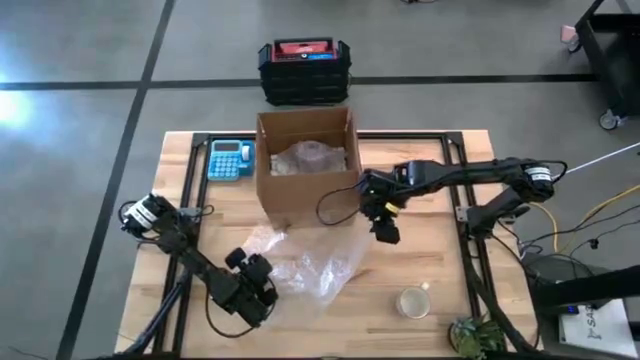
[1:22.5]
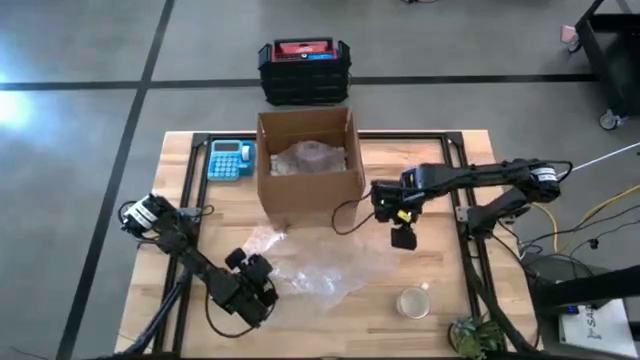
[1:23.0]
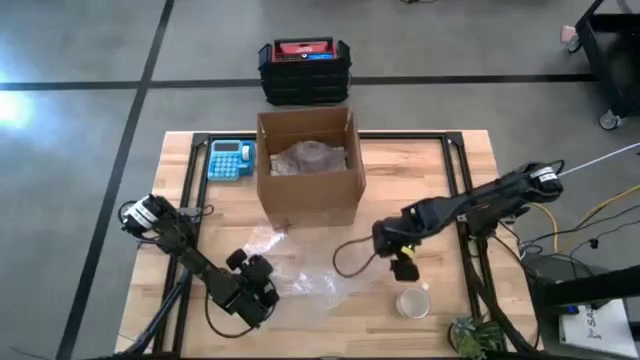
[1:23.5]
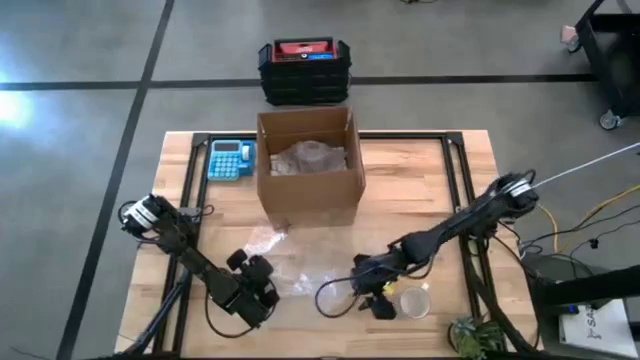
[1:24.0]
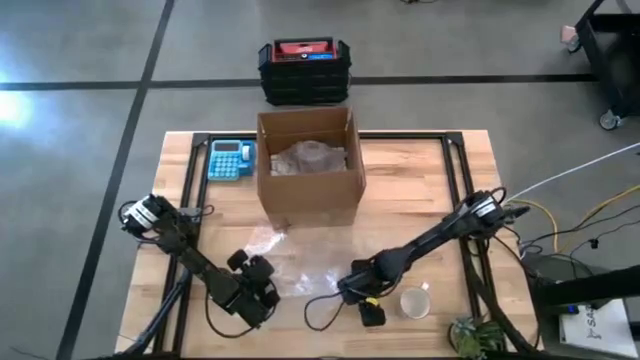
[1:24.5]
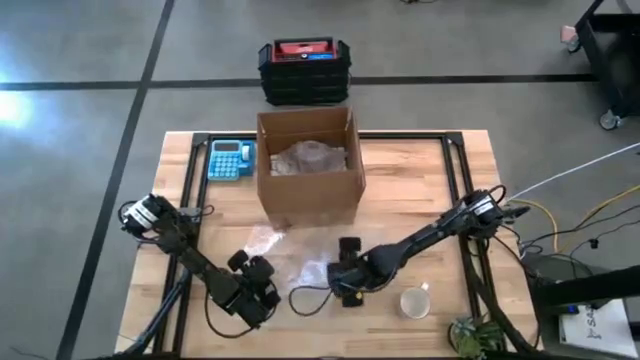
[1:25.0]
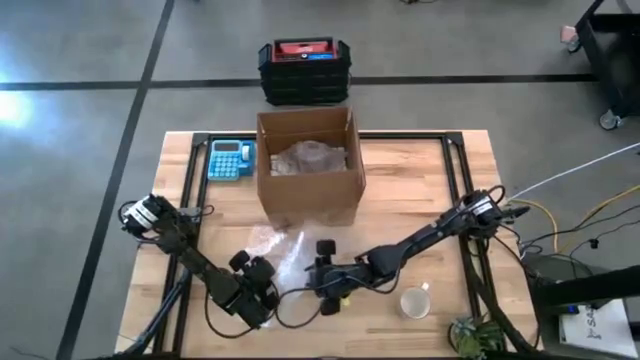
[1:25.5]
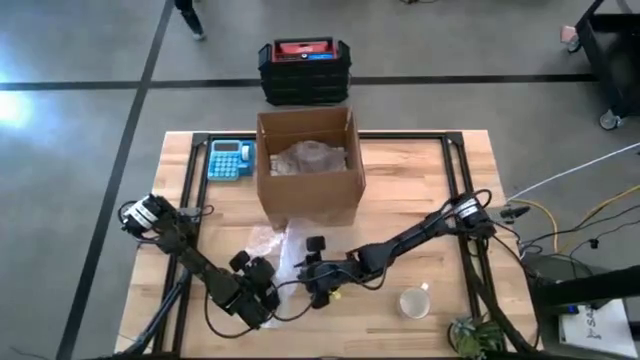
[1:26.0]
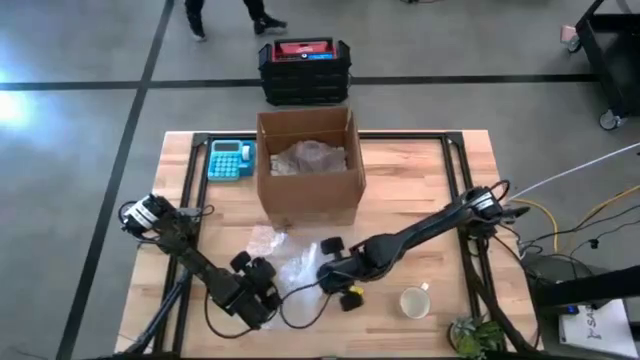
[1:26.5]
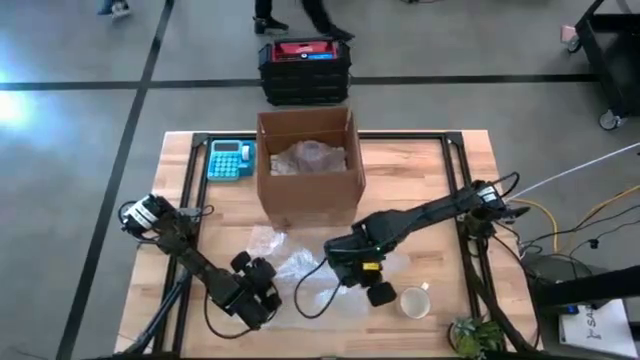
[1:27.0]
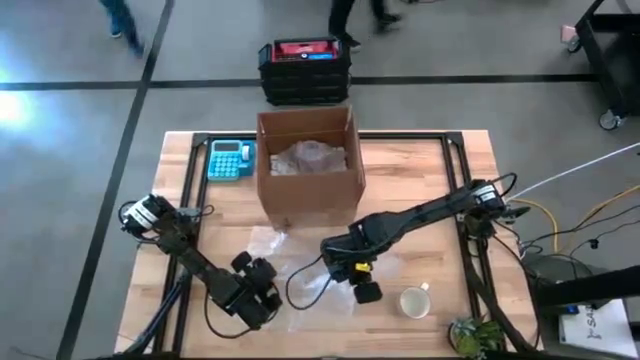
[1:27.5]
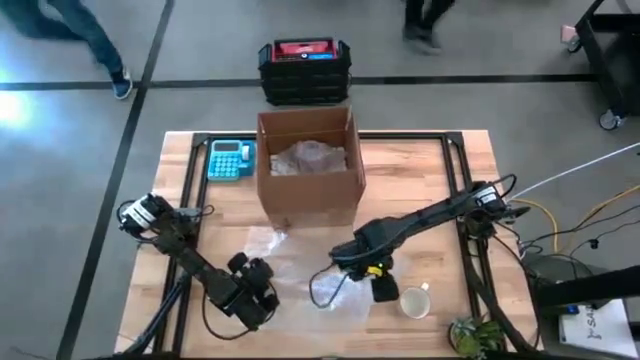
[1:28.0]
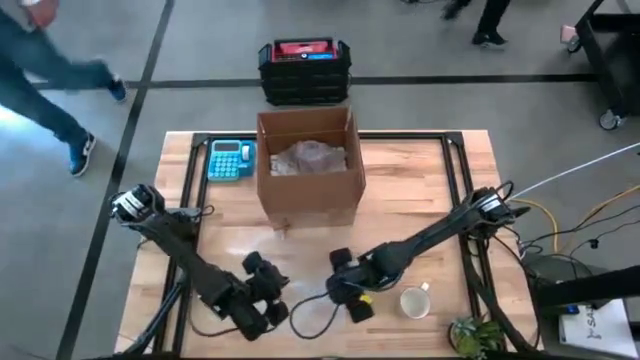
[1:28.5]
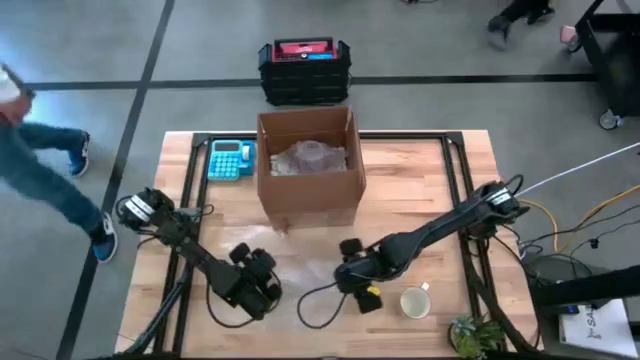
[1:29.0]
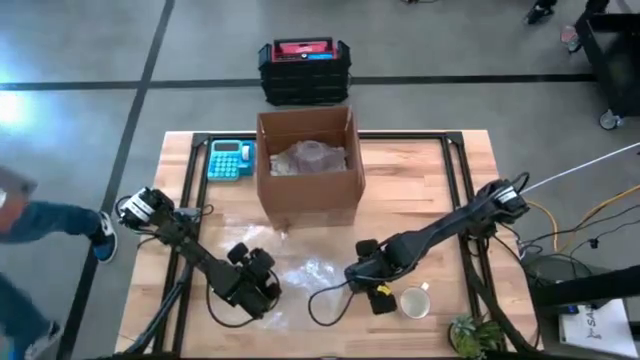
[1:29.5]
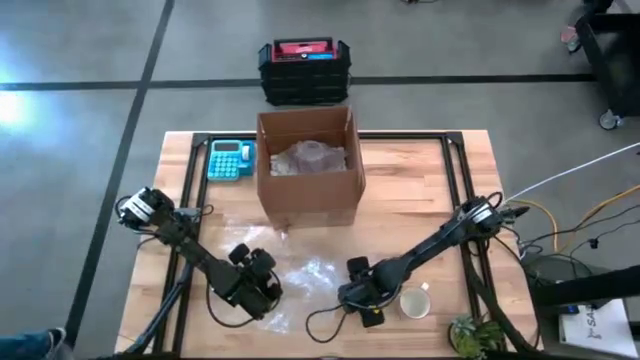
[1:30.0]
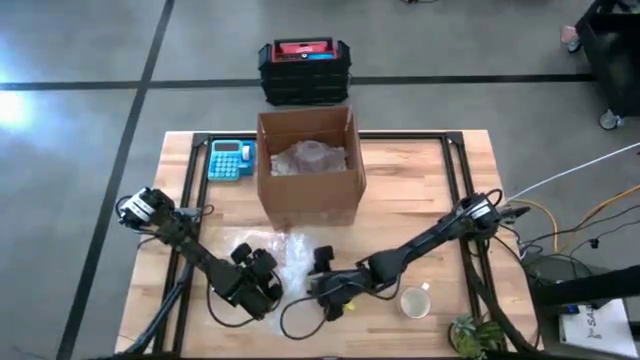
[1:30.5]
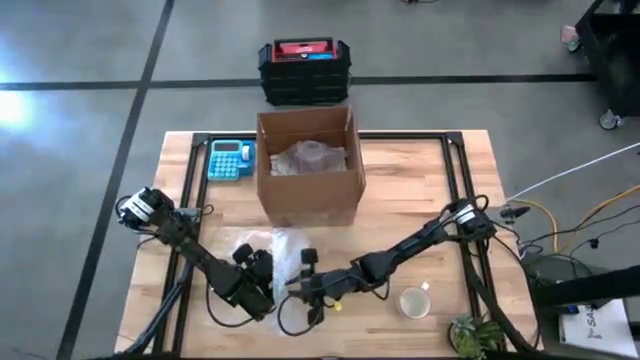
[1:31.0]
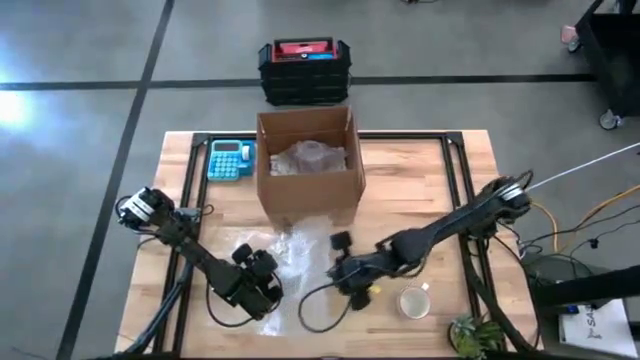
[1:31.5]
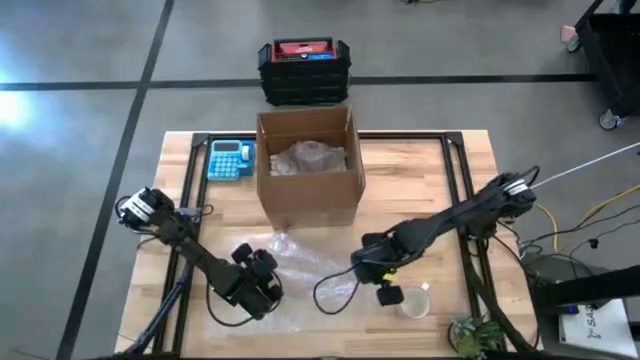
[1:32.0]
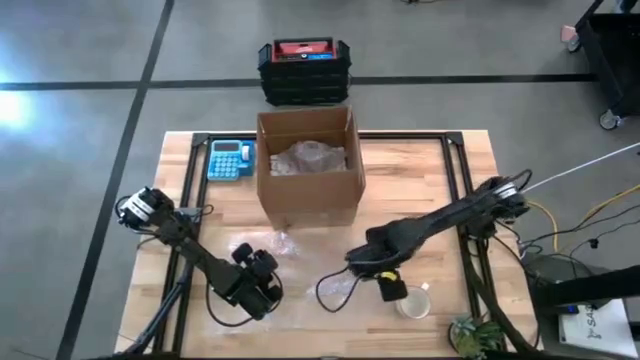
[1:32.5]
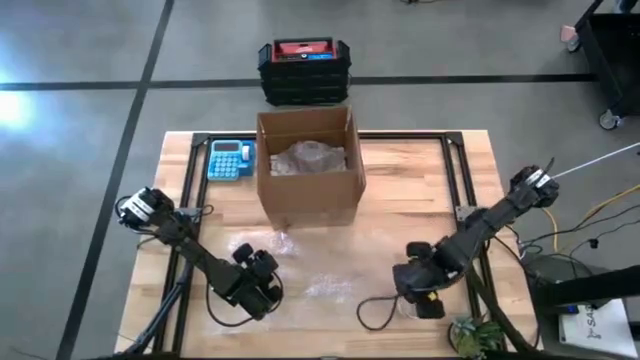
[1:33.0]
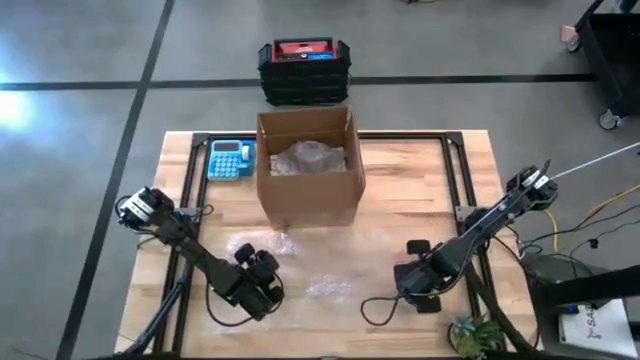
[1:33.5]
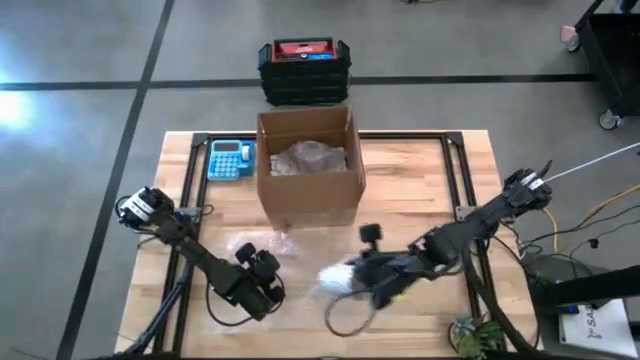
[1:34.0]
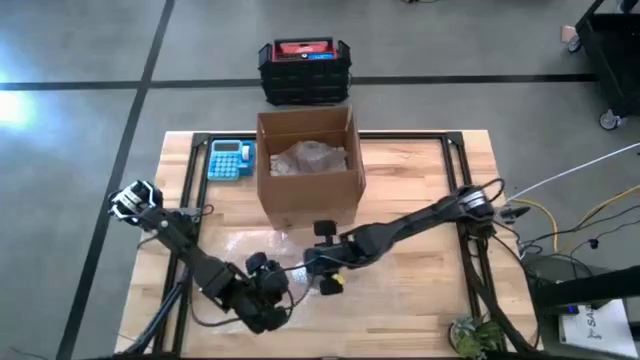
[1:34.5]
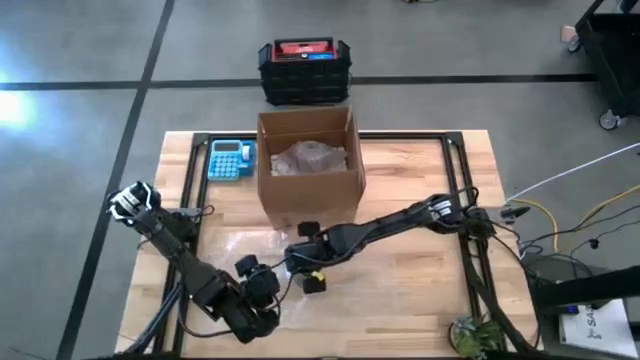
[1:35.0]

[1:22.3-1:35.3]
Task: wrap mug
Prepare the transparent bubble wrap to wrap the gray mug

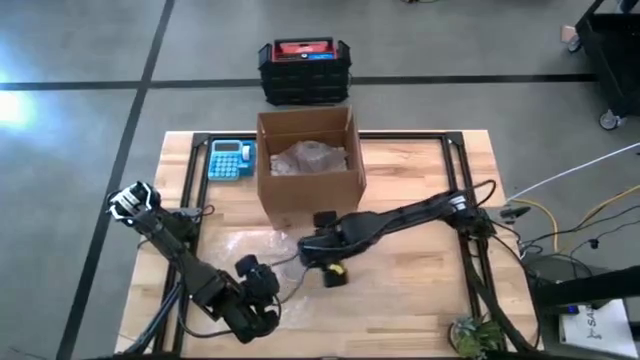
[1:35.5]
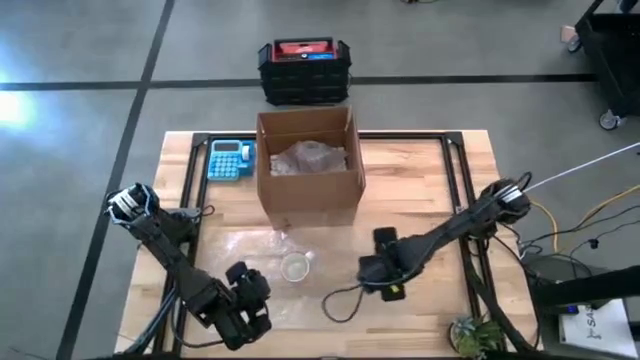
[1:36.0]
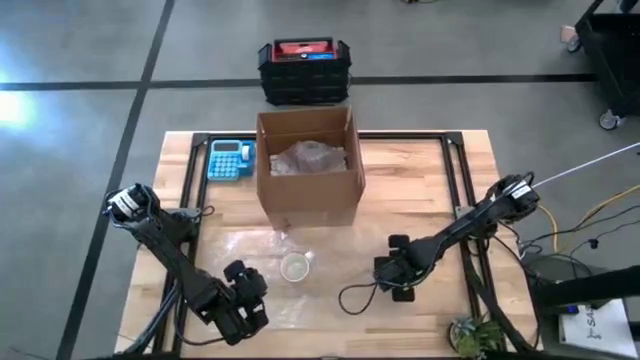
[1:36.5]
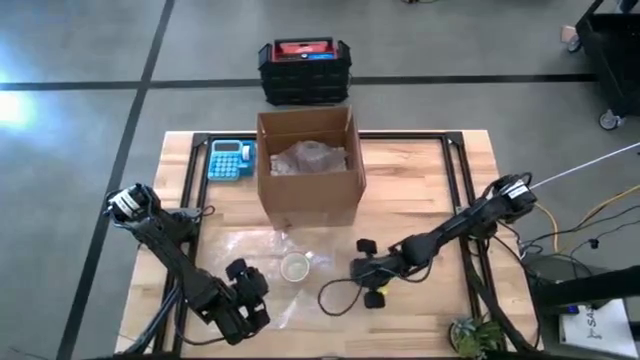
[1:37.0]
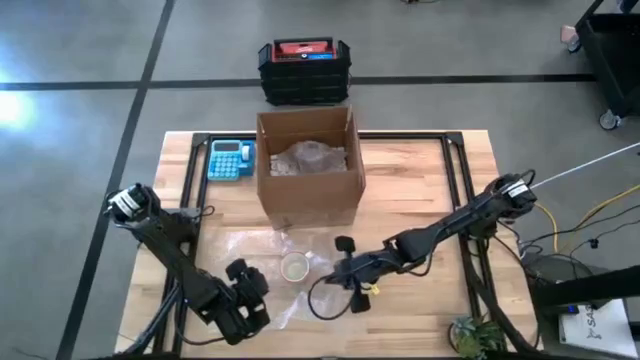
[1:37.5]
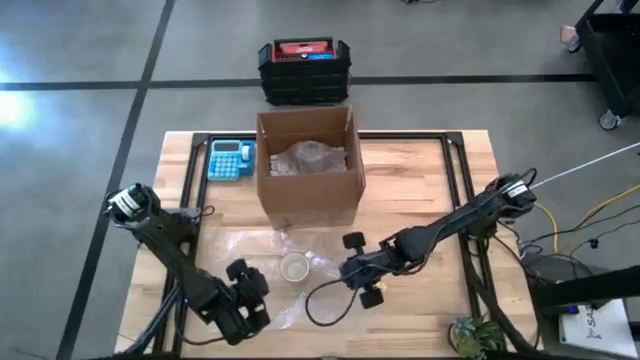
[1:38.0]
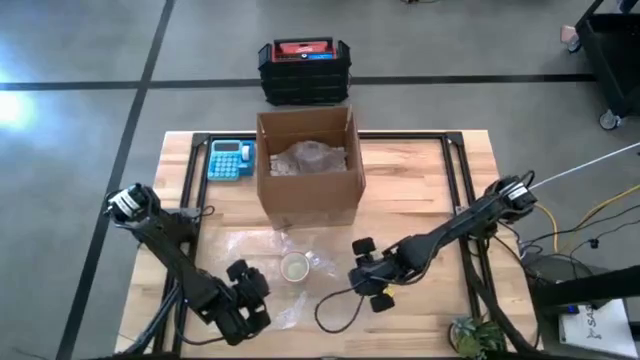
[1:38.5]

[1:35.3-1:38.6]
Wrap the gray mug with transparent bubble wrap

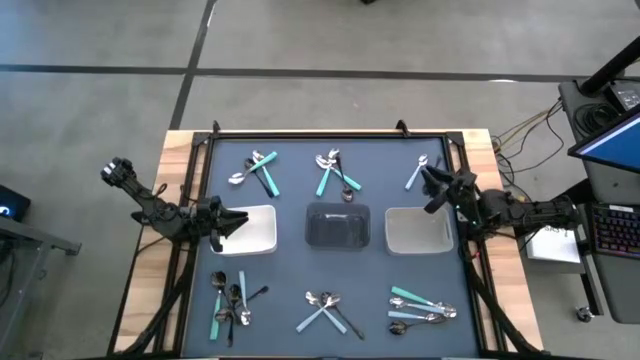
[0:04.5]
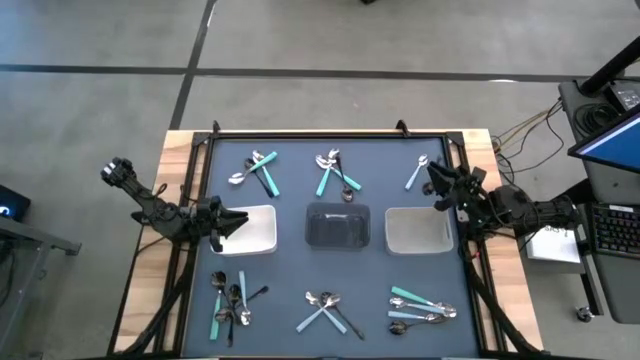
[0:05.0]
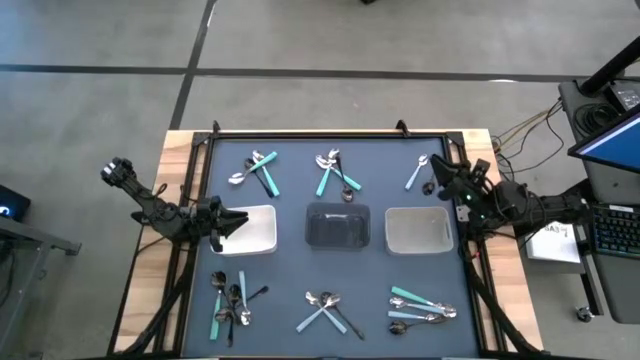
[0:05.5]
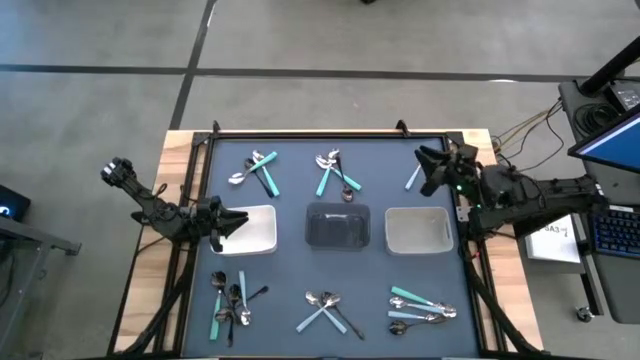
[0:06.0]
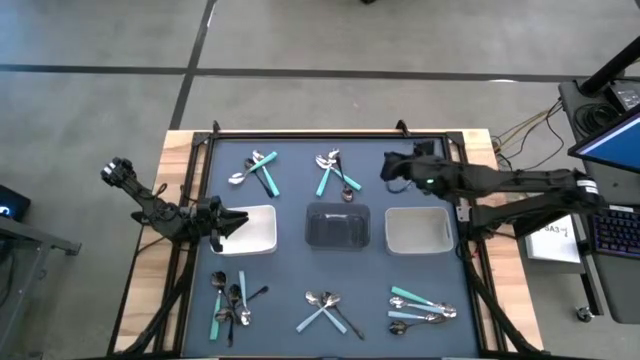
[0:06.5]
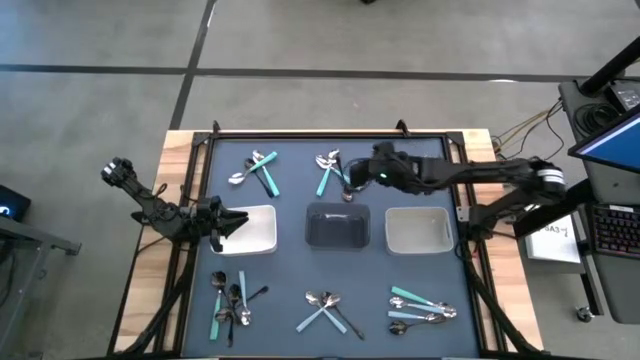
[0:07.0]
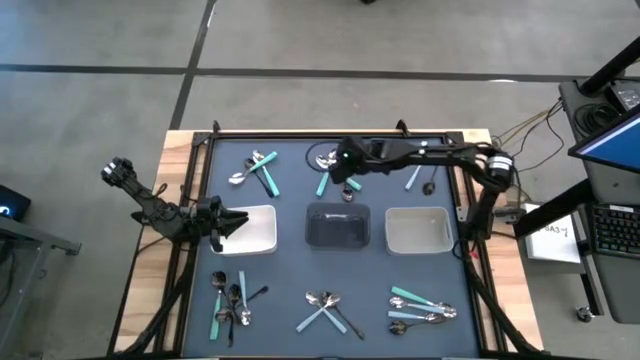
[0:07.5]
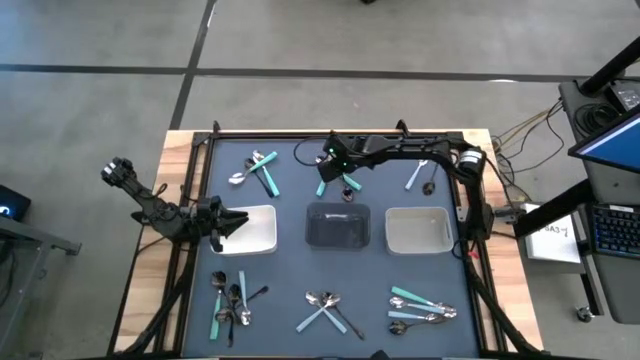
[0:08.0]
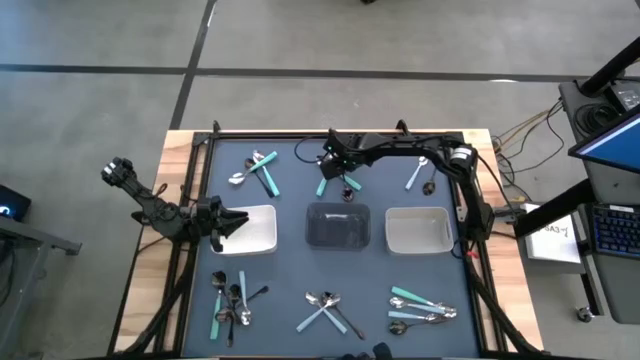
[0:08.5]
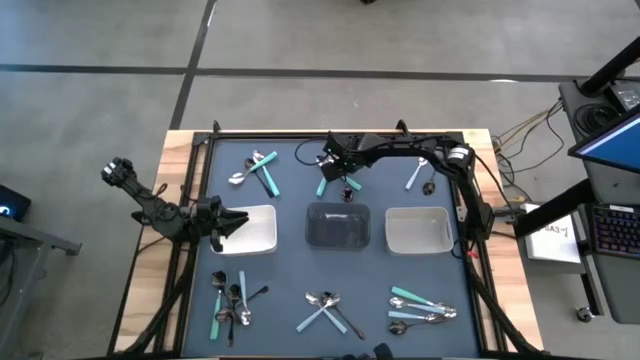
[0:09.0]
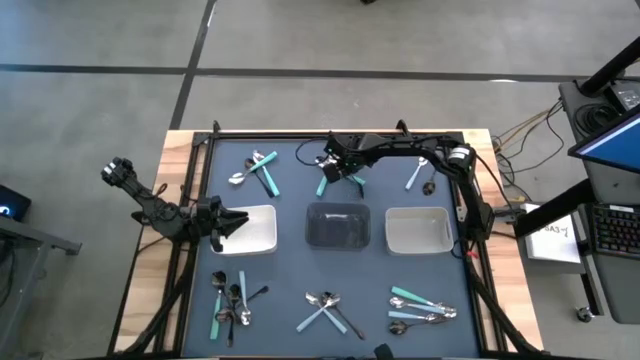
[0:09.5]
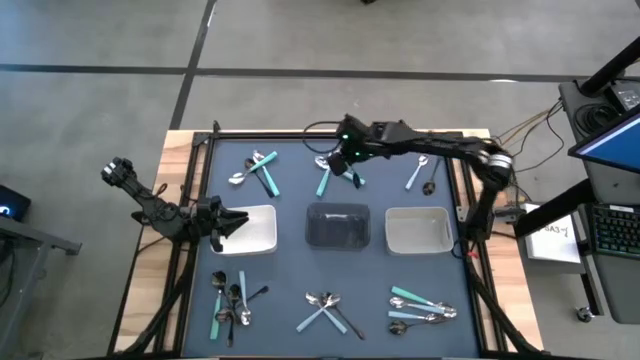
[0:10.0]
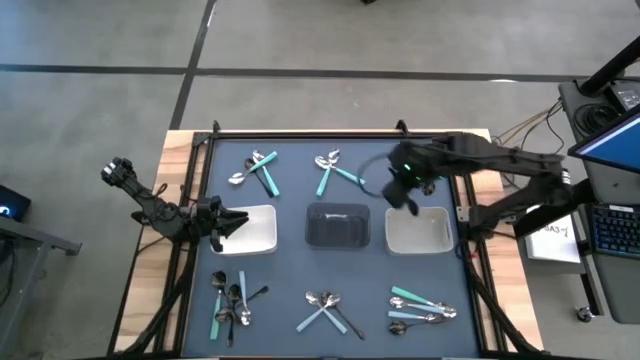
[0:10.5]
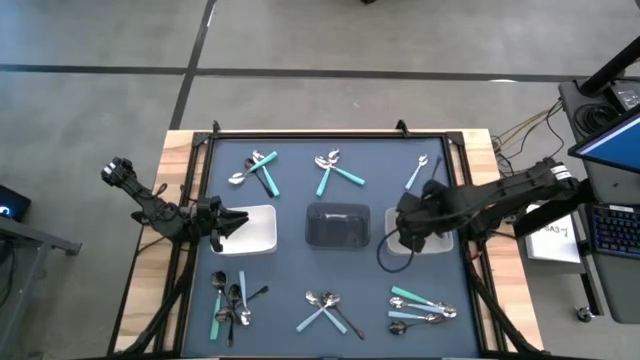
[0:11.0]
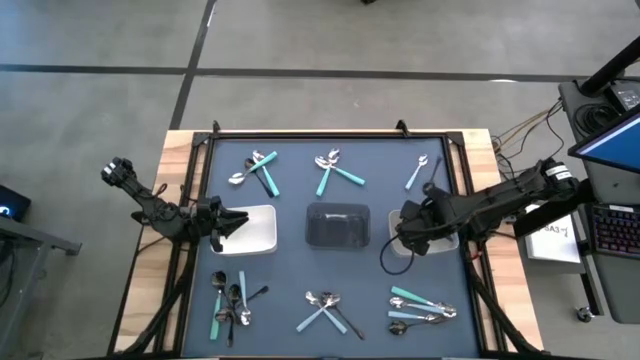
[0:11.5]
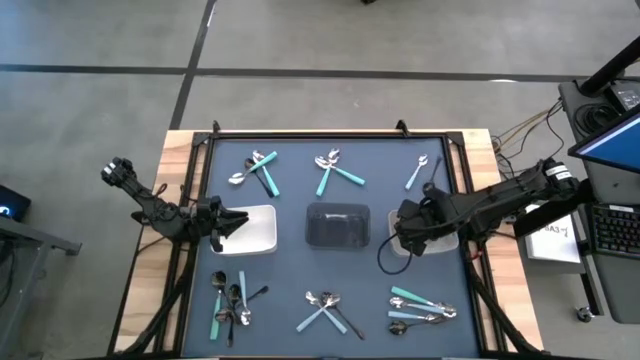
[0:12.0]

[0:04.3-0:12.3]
Task: Sort silverware by color (type)
Put the black spoon into the gray bin
